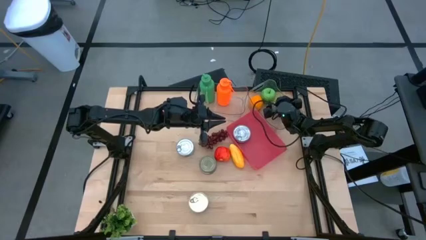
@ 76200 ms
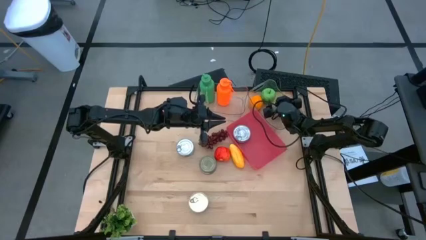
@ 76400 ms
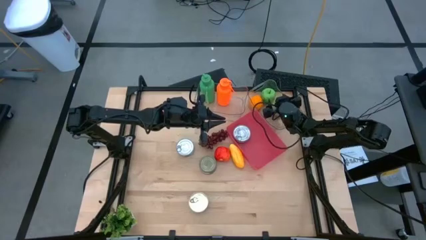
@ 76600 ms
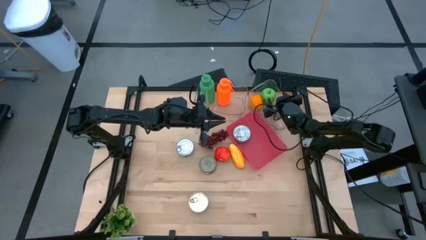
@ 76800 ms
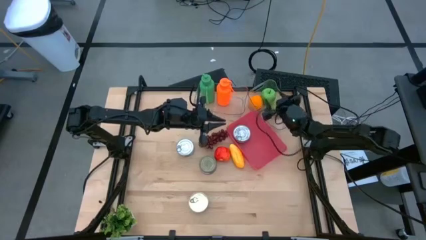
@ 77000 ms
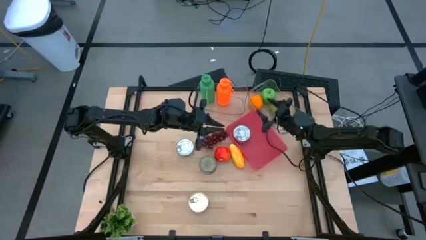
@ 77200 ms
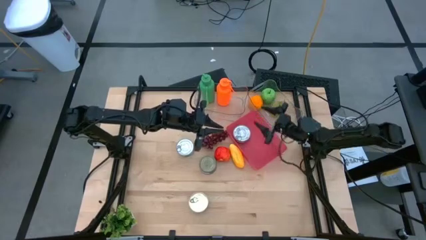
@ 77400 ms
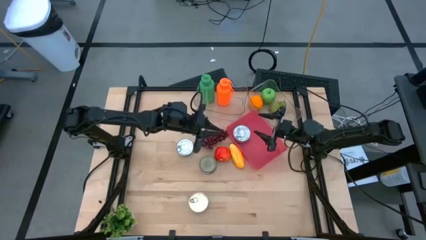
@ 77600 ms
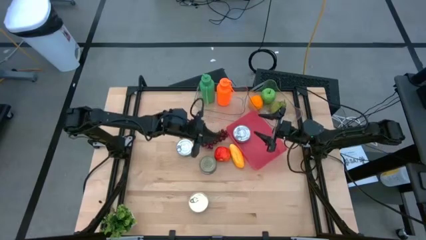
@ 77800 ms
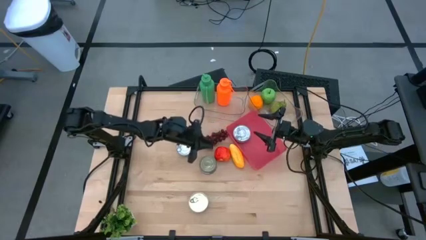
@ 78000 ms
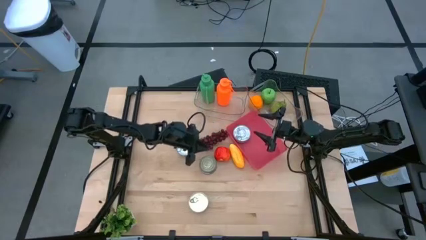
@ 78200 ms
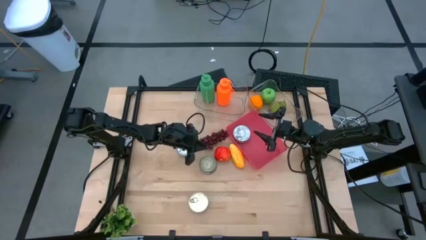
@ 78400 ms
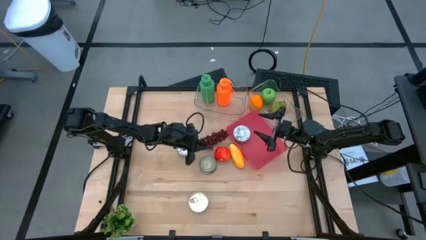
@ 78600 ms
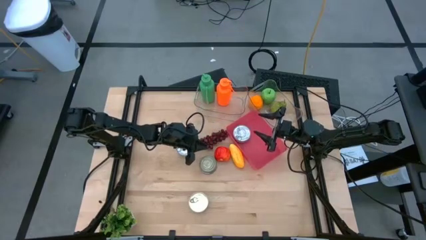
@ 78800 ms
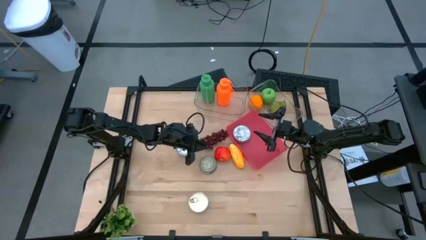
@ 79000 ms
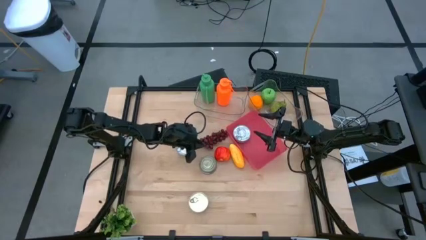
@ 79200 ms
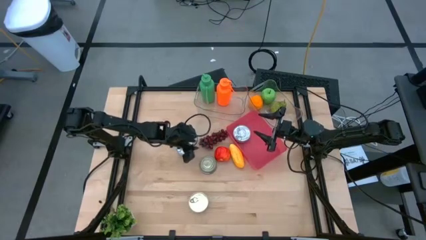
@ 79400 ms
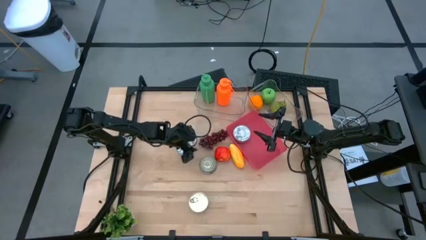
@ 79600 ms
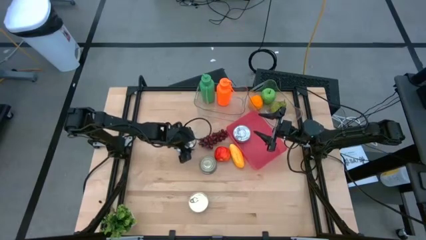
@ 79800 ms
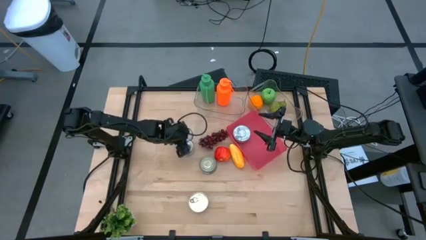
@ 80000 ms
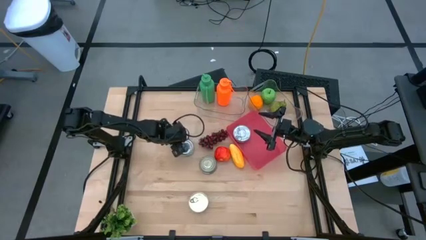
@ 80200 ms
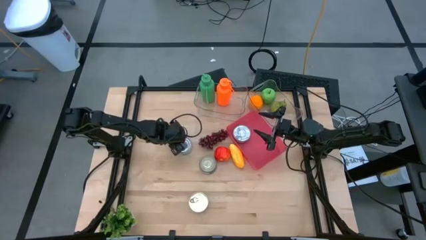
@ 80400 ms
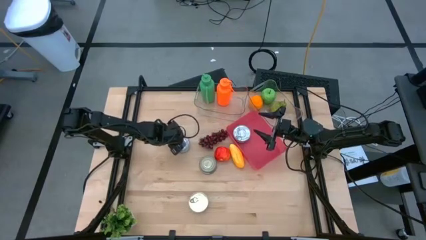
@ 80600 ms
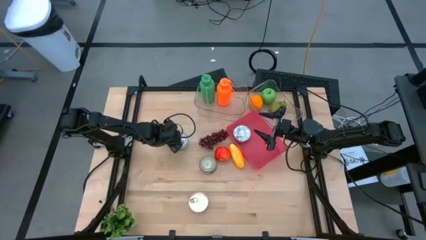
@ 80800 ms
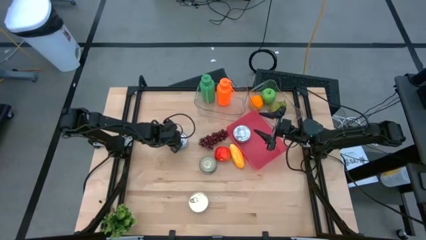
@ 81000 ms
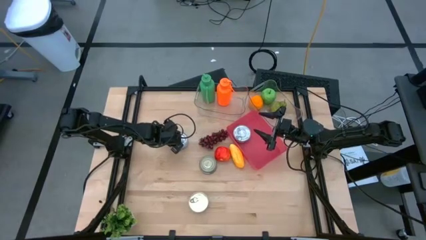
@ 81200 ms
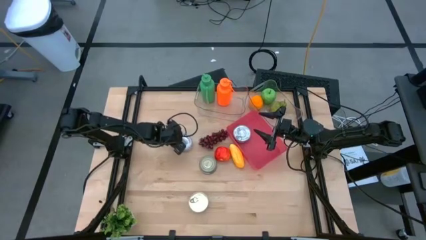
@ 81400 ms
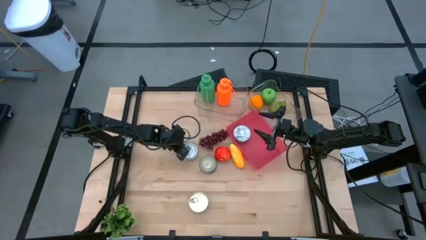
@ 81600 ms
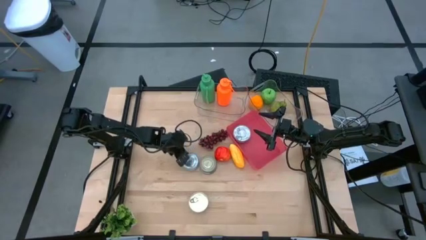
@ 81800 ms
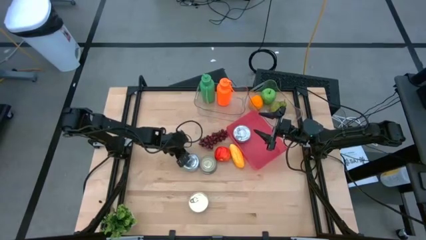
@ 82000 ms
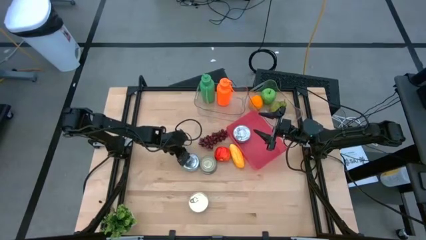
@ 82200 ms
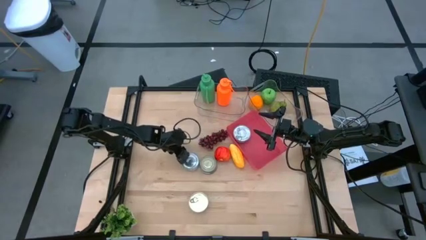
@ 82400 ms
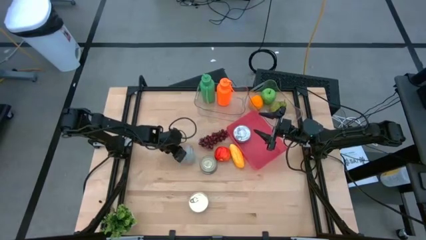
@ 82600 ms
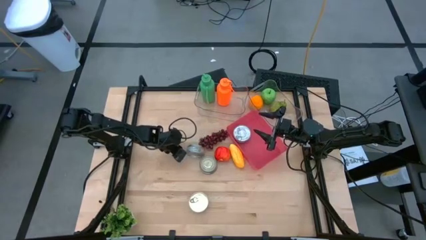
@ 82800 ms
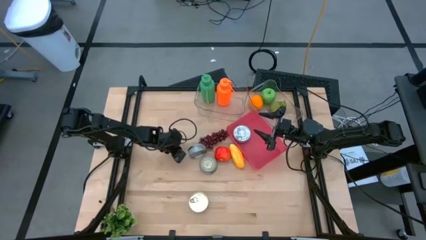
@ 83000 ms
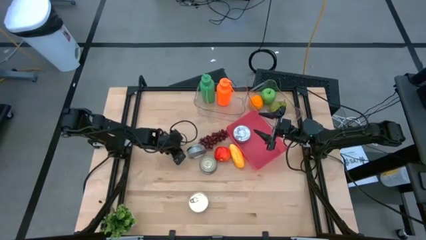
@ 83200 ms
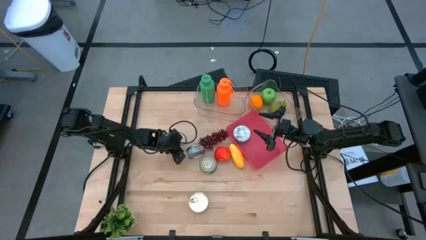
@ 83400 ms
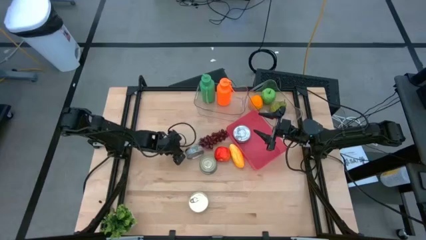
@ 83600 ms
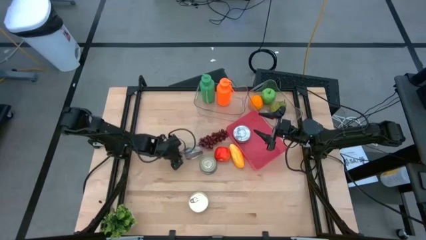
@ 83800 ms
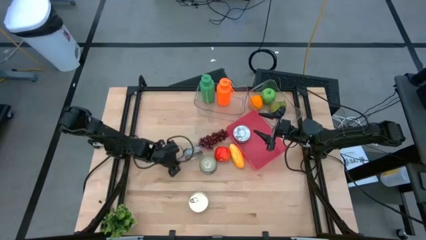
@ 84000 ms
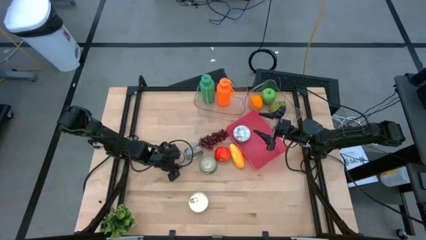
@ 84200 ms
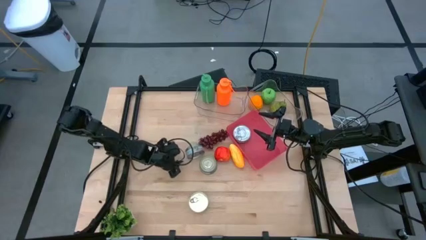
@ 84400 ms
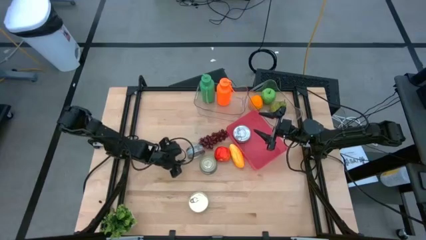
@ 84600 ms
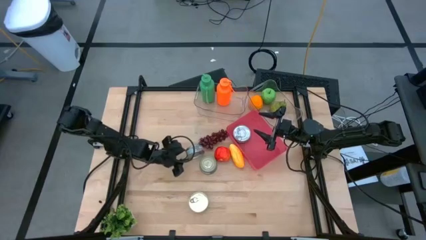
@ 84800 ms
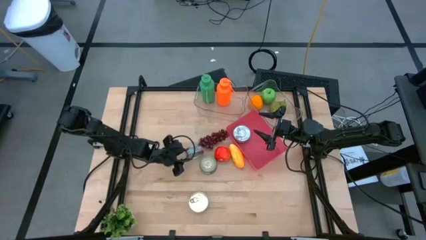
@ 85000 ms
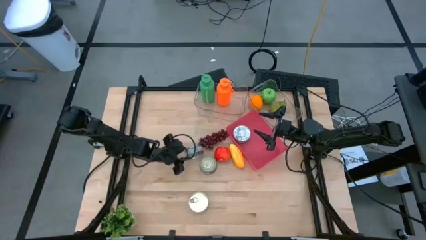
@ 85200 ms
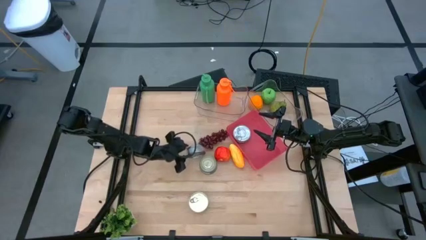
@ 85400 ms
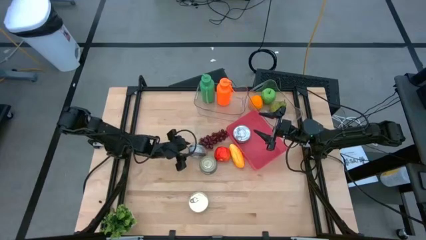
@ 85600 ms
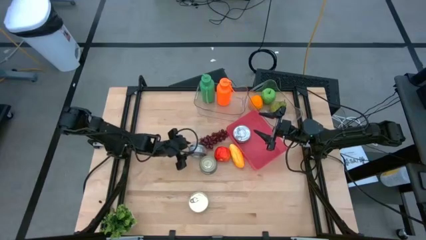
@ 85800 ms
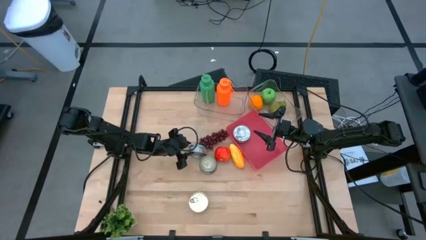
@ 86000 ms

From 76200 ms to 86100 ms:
Task: Pick & Place Food Item
Put the green tuna can into the pink bin
